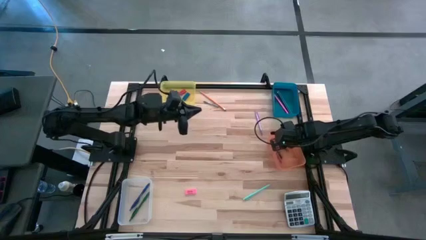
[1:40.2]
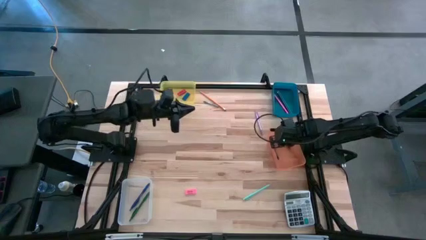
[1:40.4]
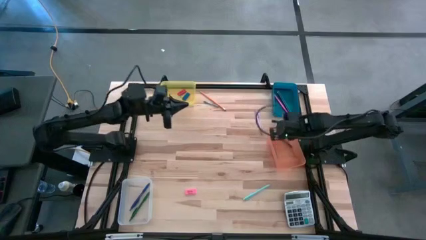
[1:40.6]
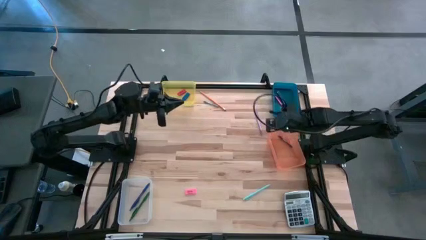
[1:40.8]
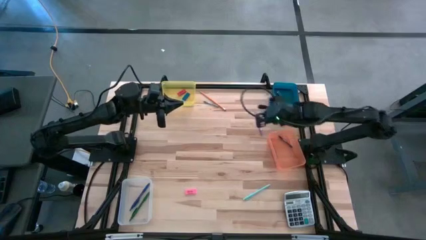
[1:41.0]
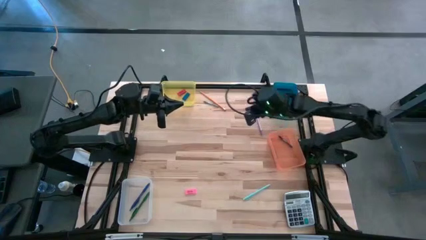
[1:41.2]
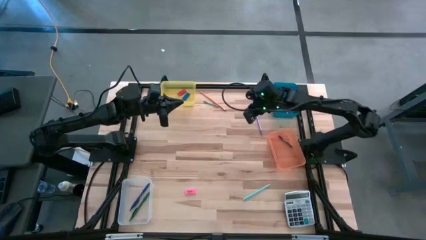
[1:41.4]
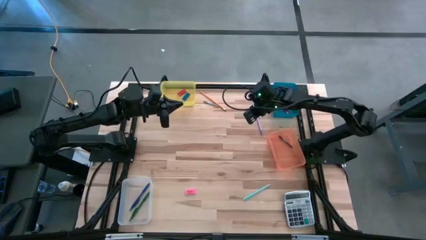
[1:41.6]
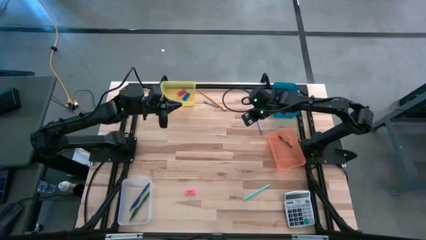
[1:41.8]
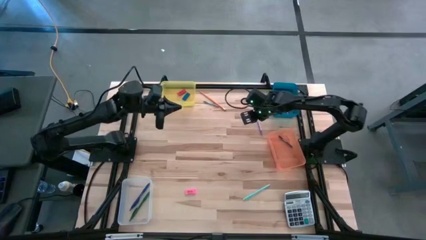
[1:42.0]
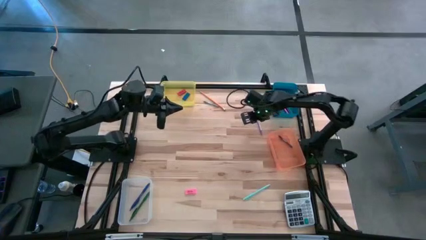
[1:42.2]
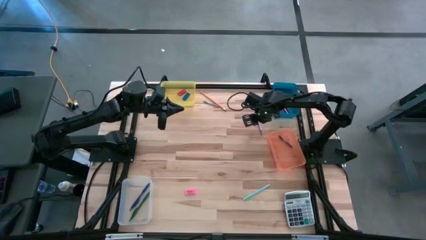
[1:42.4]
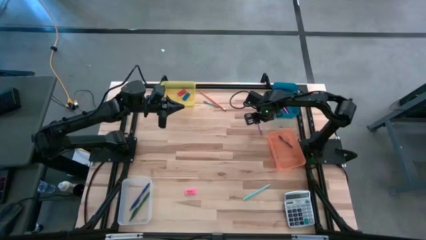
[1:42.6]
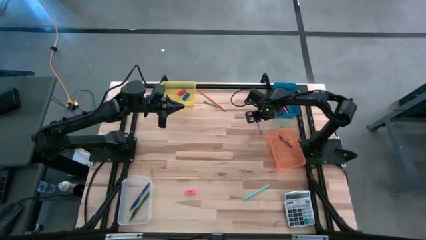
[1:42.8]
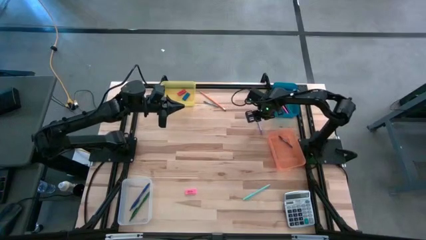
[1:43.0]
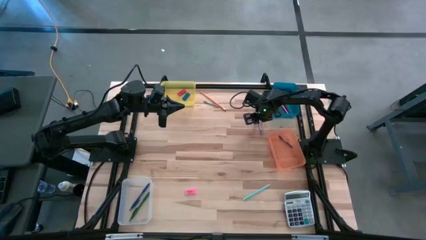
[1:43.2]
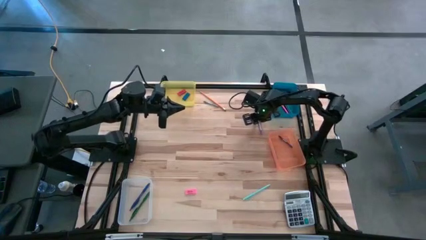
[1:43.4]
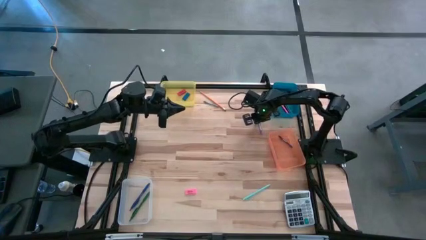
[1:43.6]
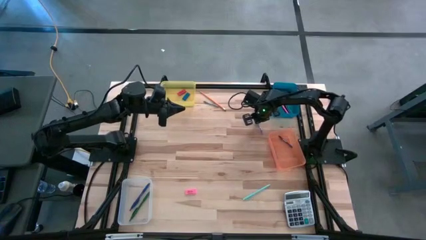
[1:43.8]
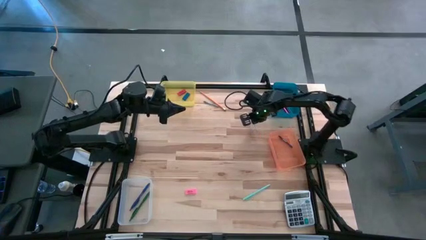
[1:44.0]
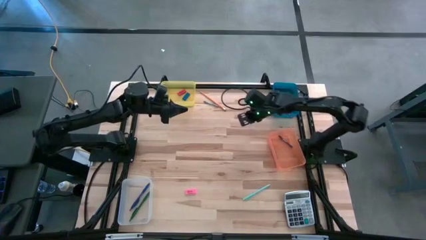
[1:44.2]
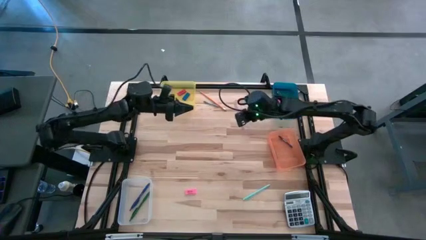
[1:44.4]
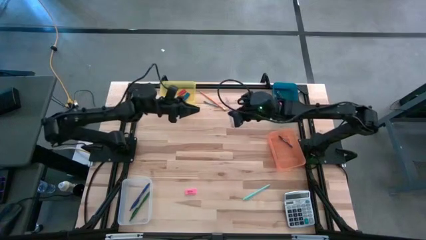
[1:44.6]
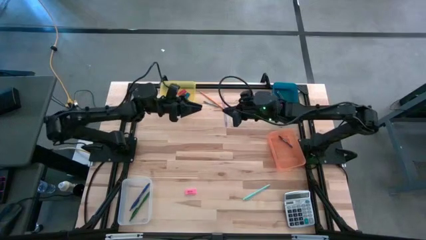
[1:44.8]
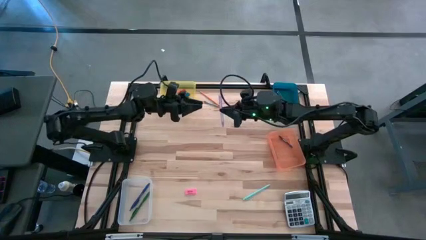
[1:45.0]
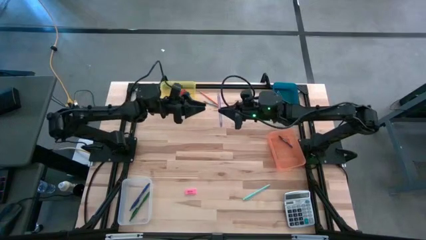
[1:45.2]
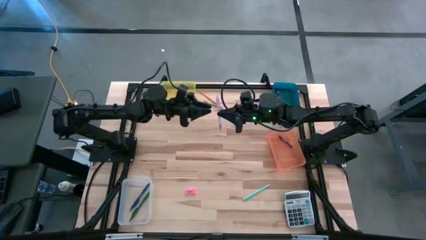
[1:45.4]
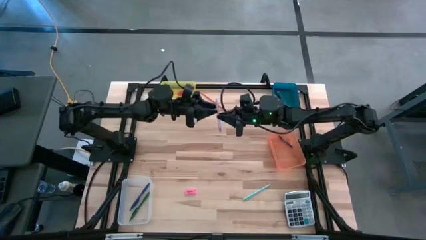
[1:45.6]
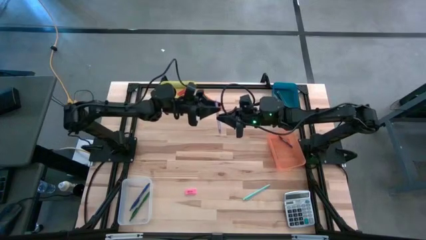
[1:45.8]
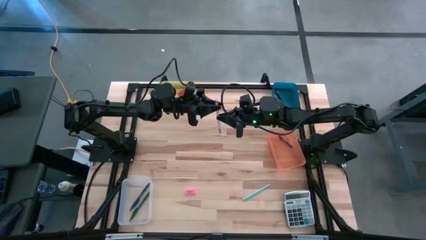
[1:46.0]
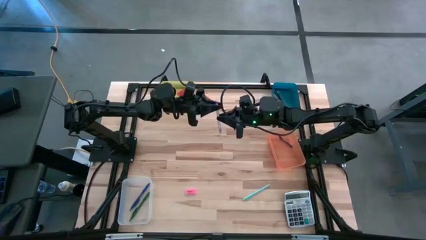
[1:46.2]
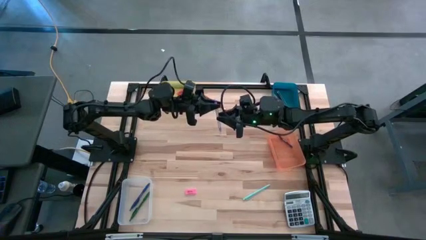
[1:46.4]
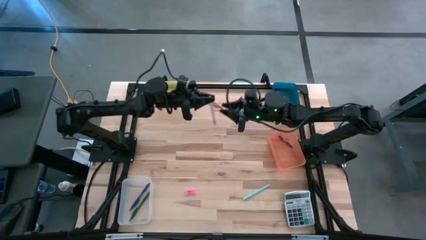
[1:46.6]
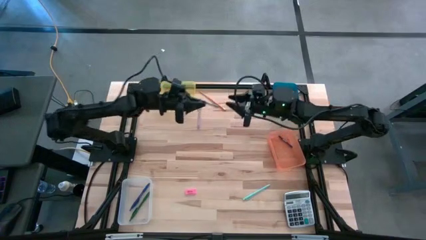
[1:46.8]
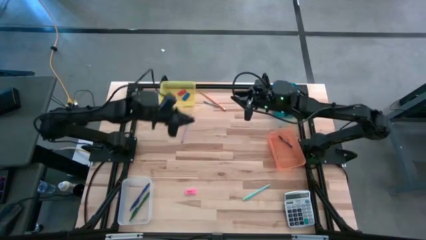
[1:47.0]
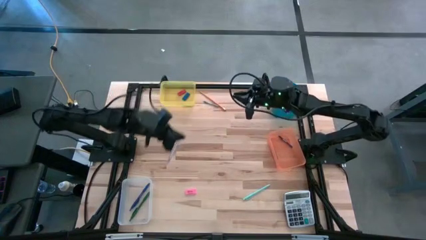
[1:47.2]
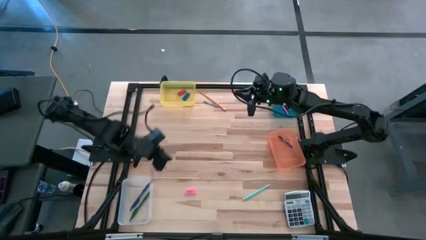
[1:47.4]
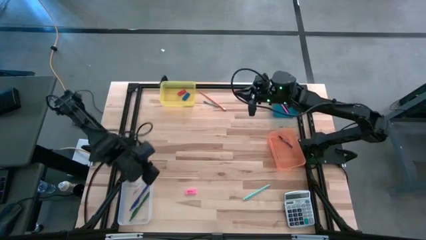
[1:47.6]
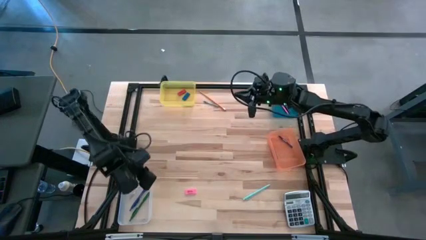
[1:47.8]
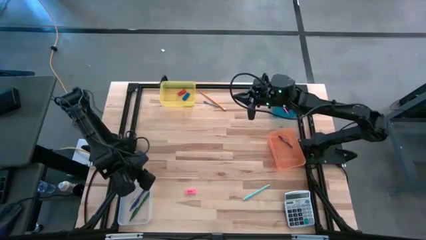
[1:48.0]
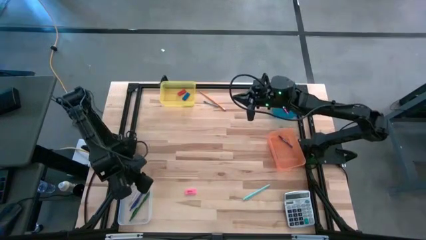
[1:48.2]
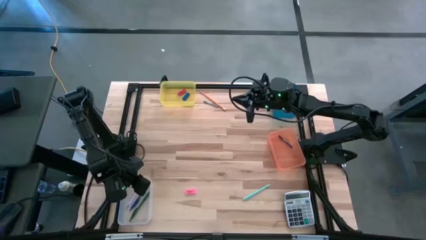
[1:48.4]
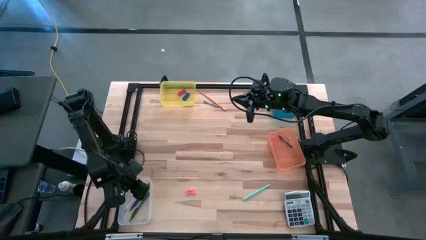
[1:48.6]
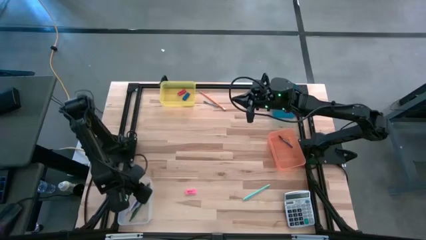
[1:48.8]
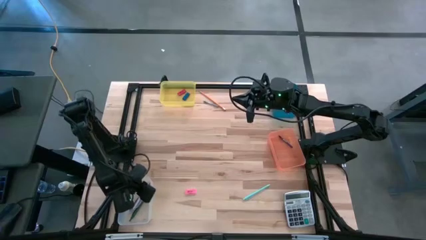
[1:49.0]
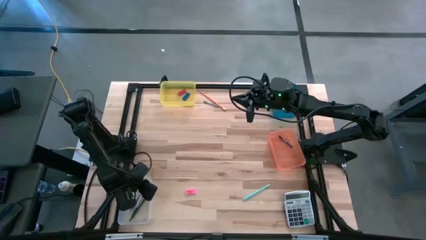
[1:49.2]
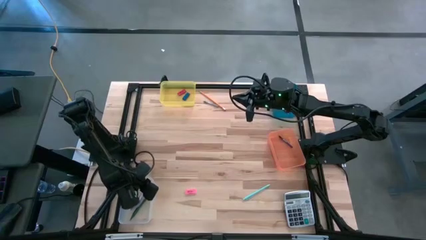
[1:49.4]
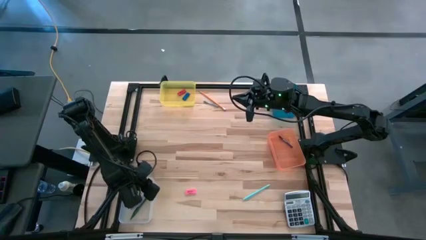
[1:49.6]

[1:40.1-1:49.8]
Task: Sort crayons/erasers/pens/pencils in bins
Put the violet pen into the white bin

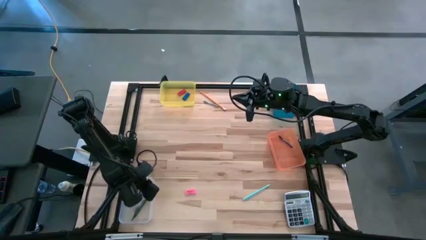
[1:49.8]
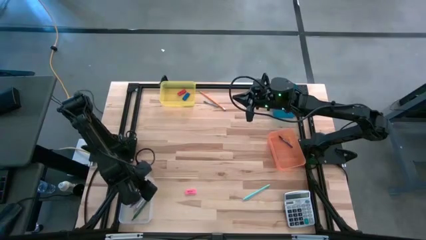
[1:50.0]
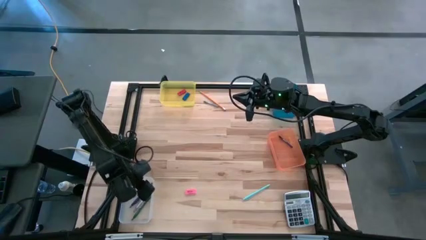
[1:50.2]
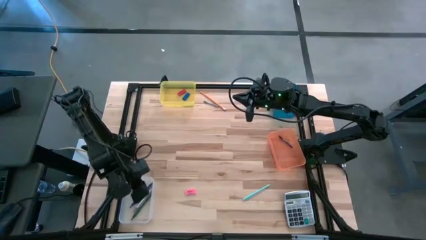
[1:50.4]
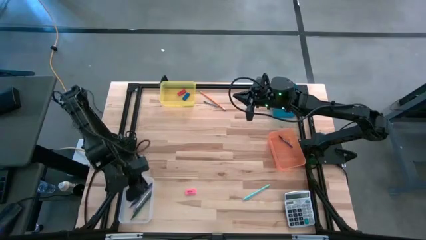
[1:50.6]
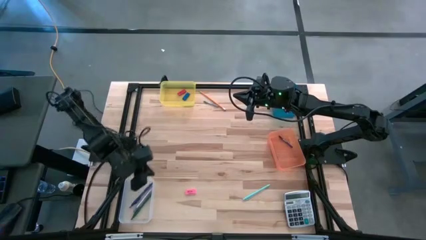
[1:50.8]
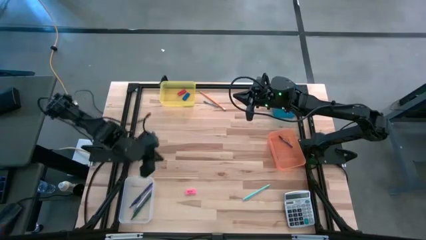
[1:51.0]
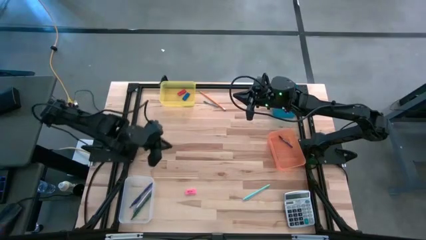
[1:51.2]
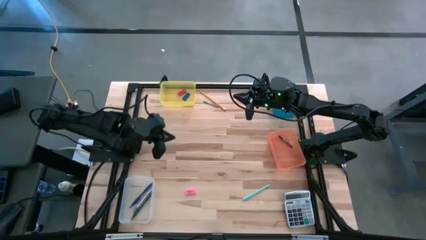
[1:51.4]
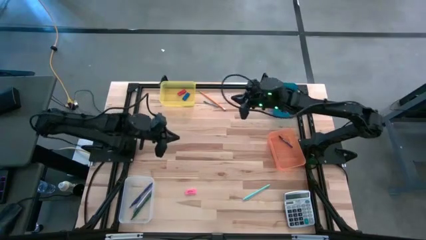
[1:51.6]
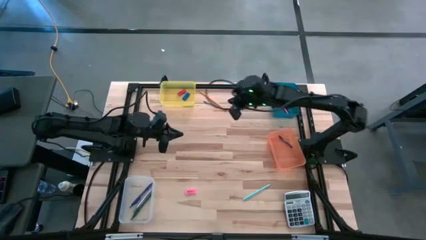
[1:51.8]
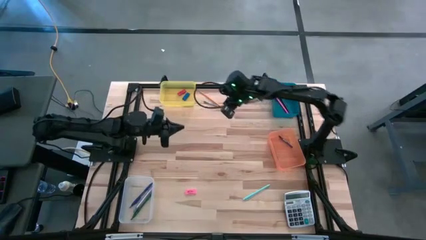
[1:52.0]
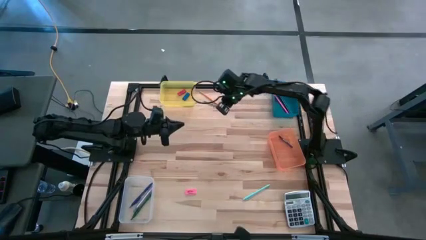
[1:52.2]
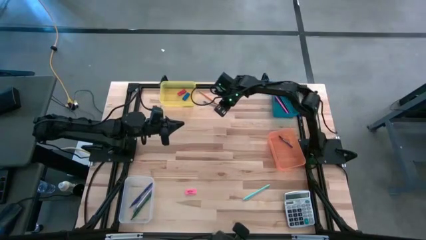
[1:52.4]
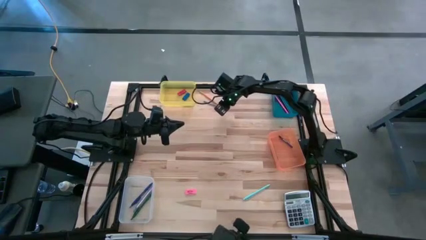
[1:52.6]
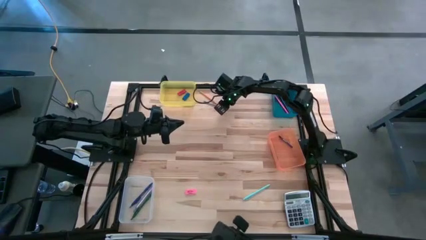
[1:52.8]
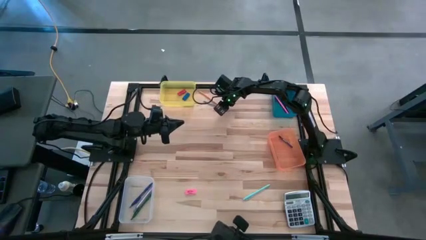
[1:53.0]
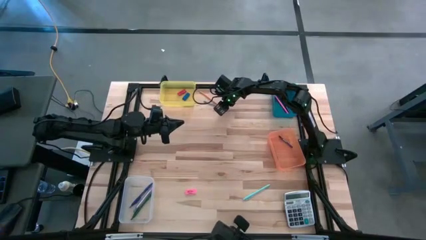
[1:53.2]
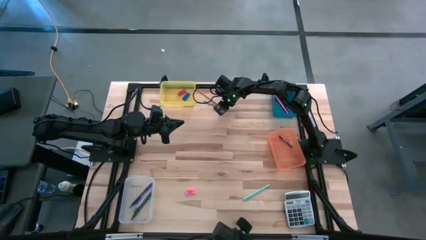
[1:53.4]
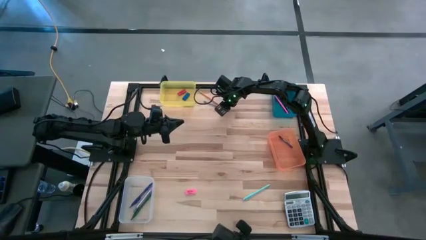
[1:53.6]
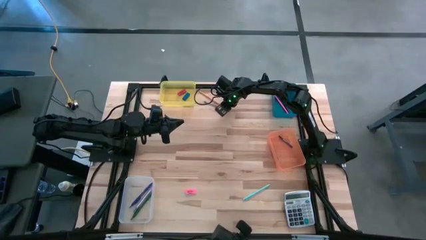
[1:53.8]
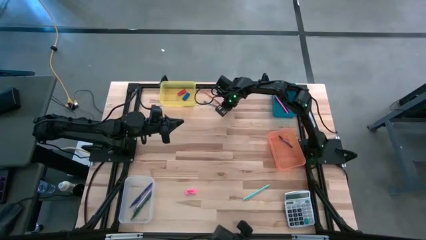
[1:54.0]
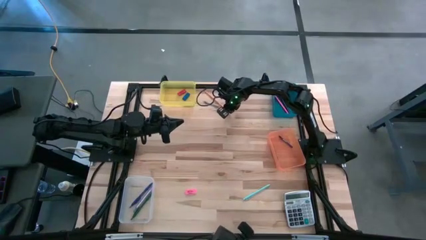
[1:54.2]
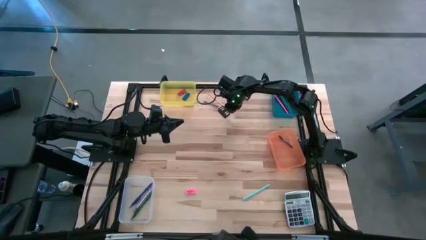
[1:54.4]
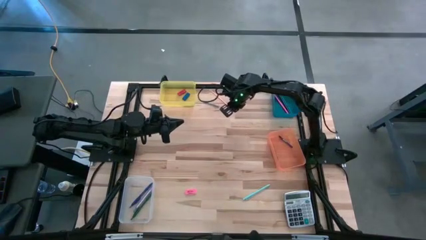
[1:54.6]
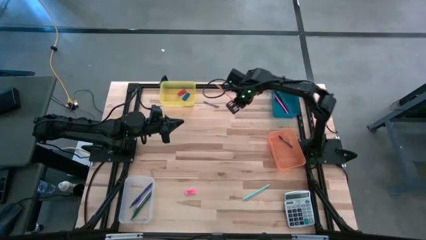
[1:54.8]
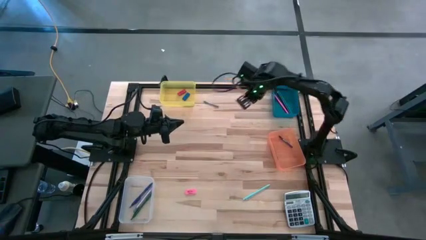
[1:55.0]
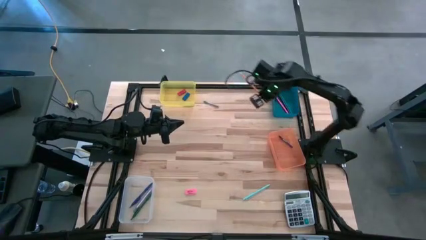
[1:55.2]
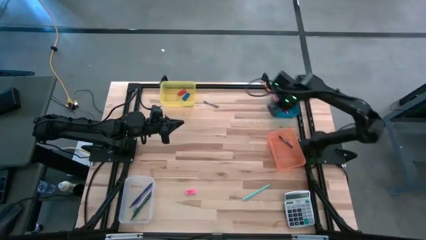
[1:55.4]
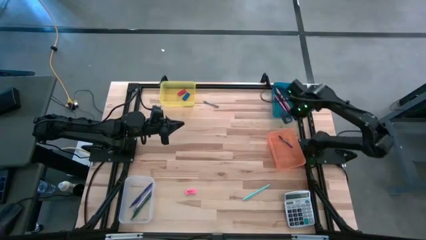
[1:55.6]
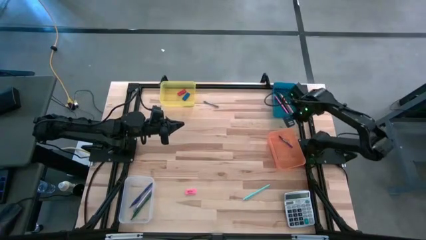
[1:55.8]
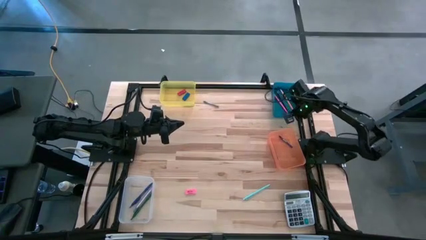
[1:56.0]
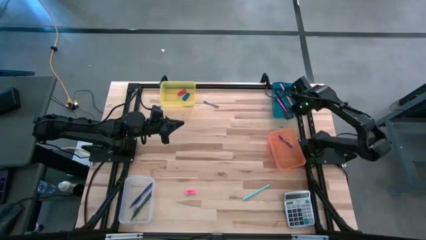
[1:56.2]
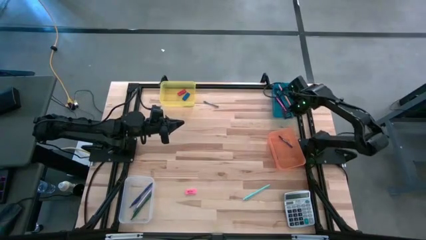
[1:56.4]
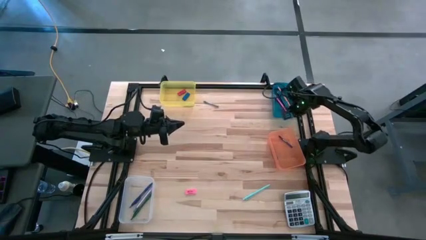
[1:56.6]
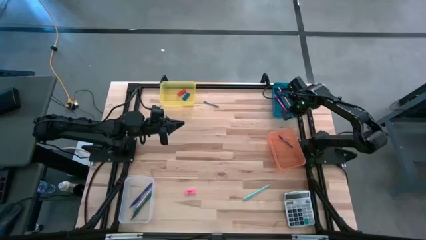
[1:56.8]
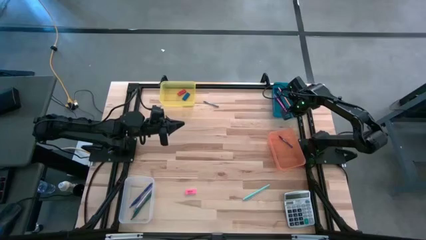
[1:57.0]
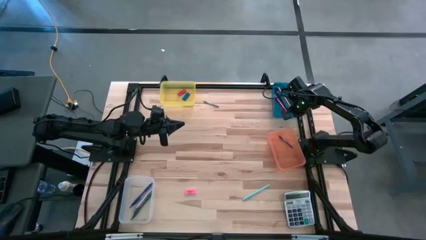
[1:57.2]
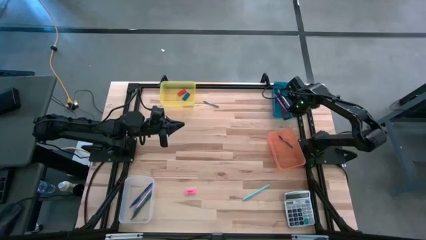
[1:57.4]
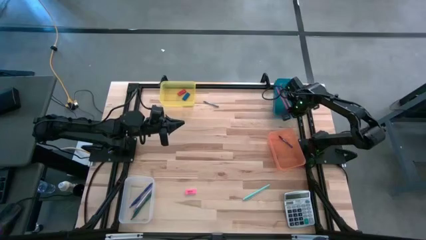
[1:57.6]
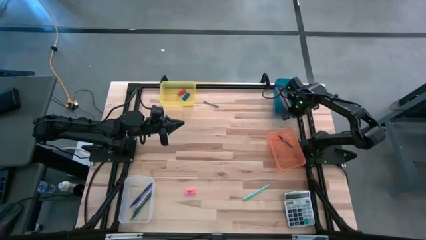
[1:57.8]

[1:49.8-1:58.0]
Put the orange pencil into the blue bin
